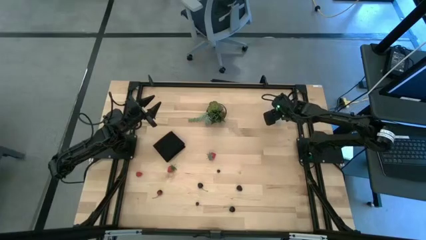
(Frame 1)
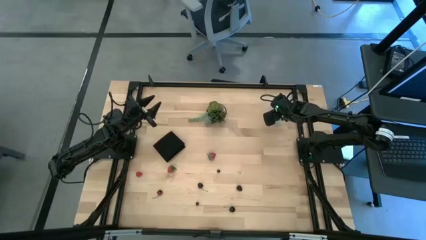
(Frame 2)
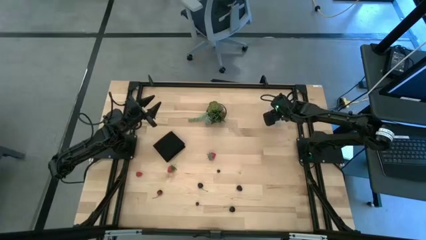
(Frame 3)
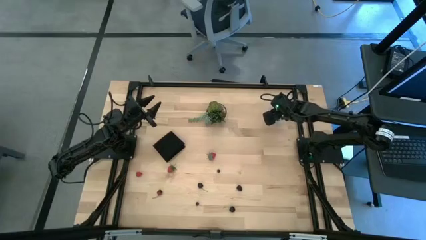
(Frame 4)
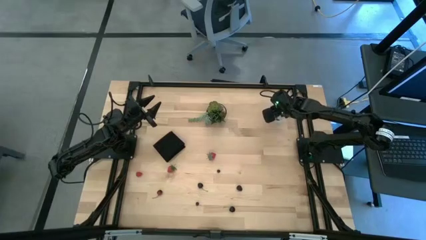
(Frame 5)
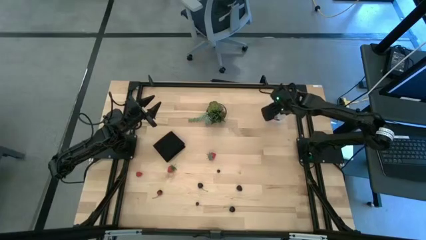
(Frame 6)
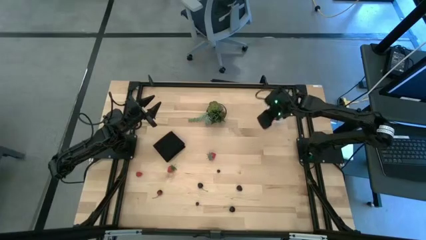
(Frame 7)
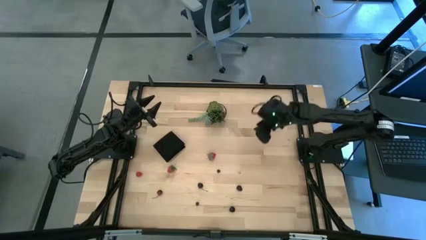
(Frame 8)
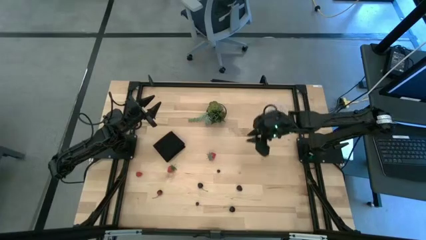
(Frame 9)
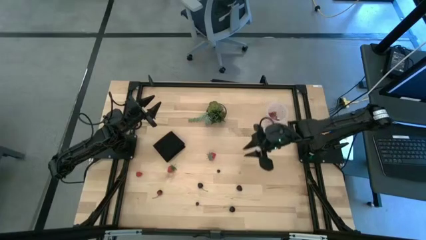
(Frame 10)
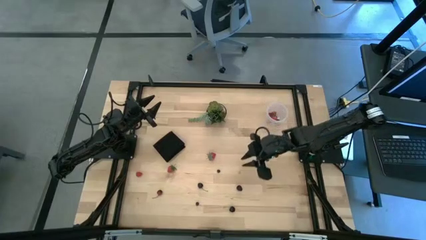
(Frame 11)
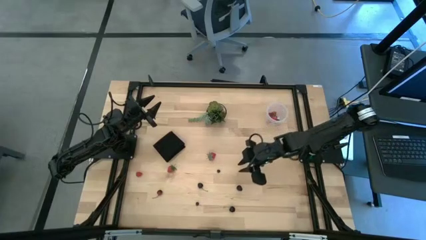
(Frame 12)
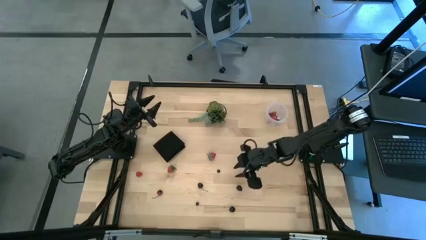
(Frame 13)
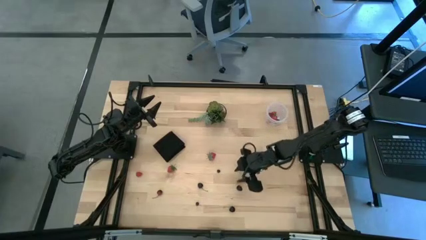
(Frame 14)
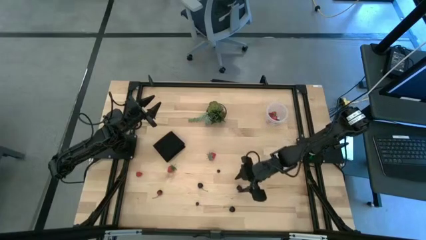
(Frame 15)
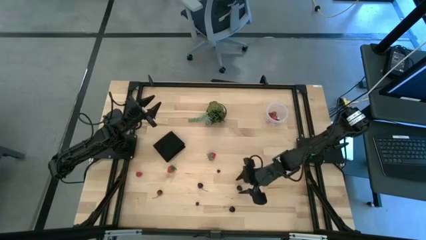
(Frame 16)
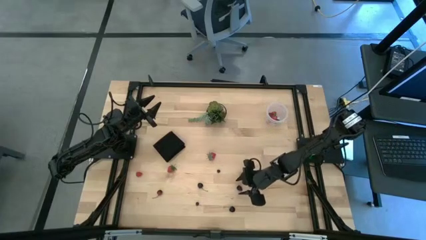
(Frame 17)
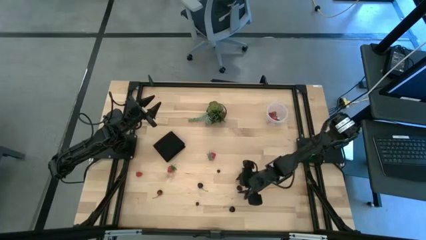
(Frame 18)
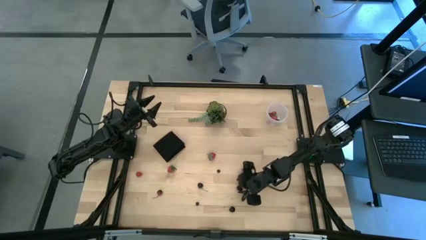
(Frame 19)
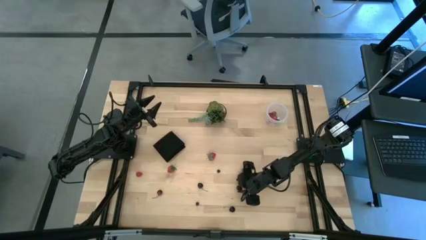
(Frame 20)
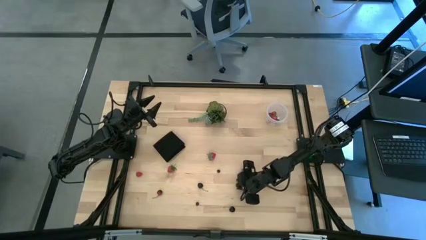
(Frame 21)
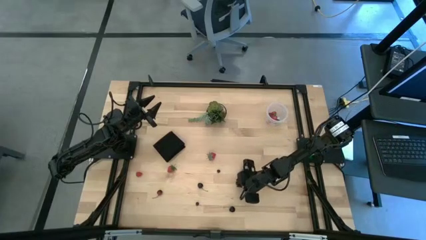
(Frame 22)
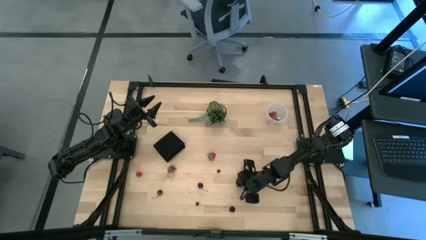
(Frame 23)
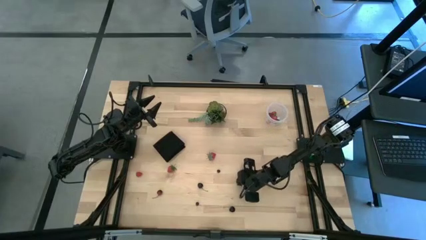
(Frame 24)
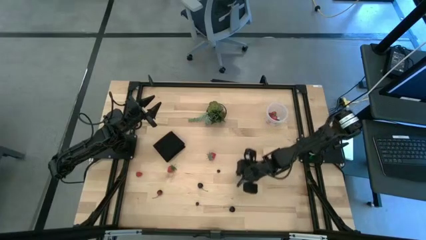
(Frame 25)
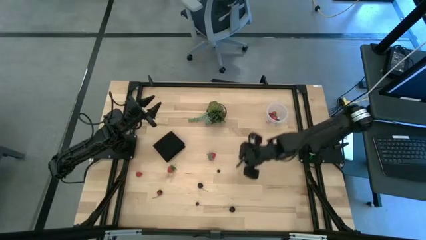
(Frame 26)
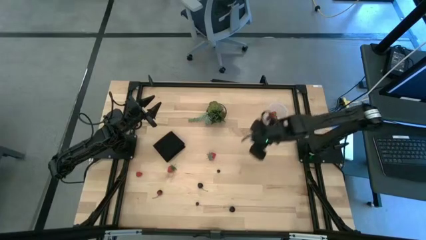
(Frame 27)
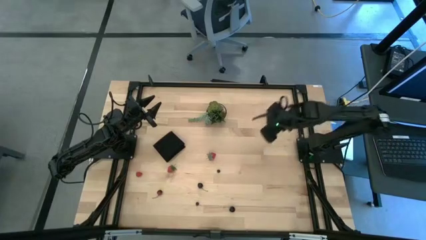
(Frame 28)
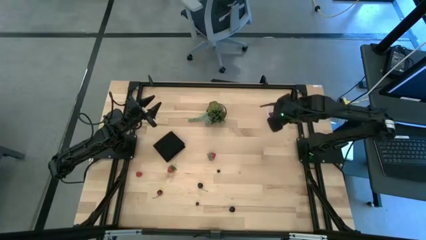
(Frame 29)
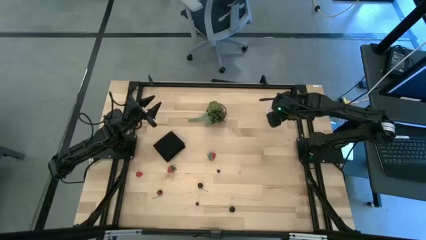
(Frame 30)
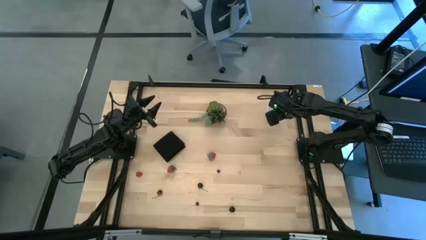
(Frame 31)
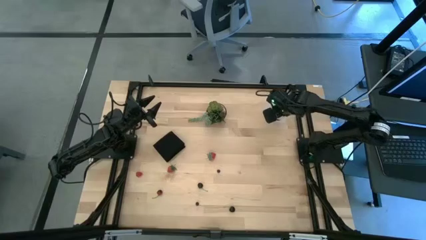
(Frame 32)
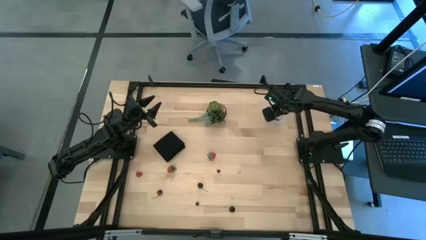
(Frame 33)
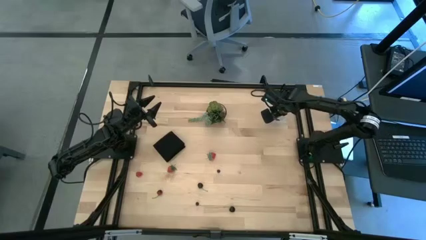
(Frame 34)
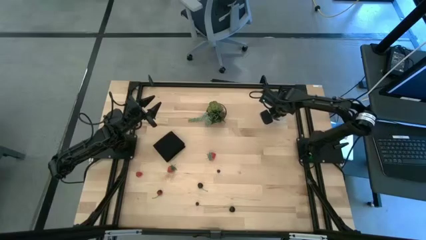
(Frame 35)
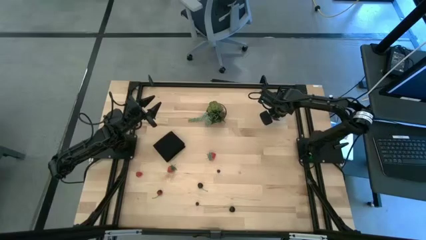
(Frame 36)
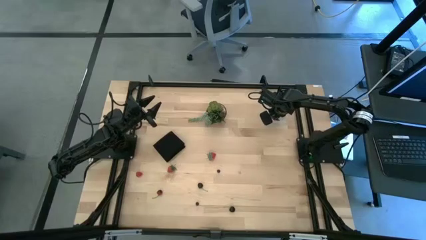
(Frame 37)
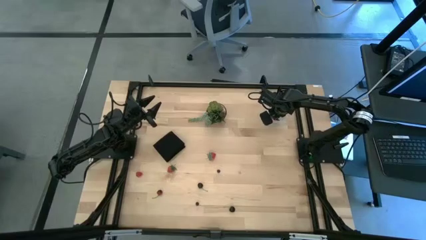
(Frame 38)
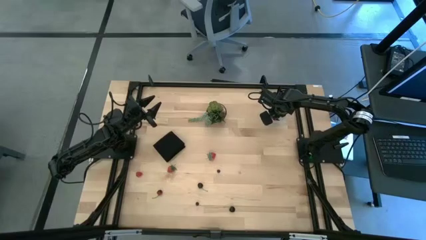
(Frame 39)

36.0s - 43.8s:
Task: Pick and placing Produce into tupperware
Put the top blackberry into the bin

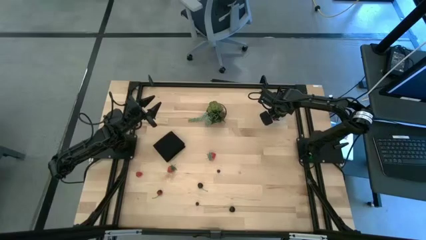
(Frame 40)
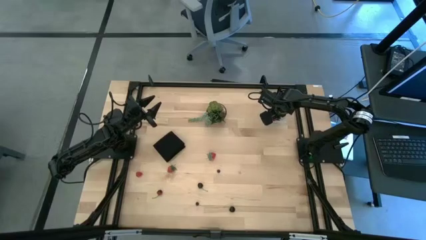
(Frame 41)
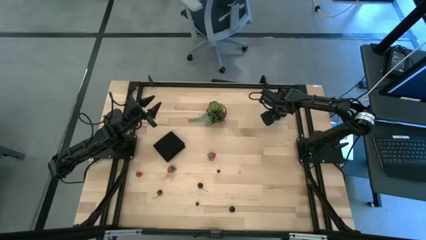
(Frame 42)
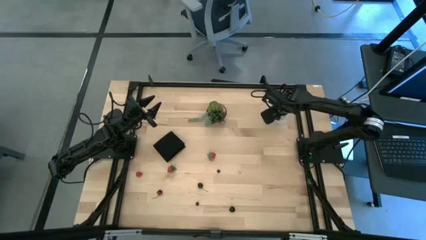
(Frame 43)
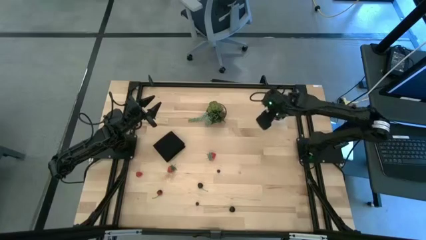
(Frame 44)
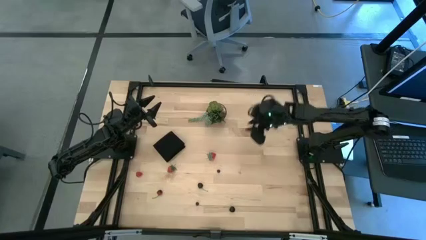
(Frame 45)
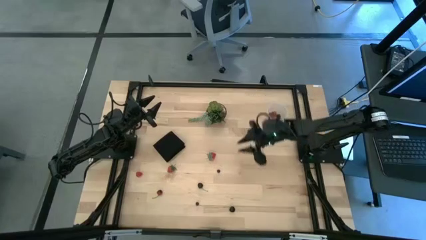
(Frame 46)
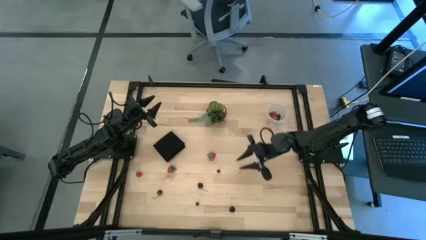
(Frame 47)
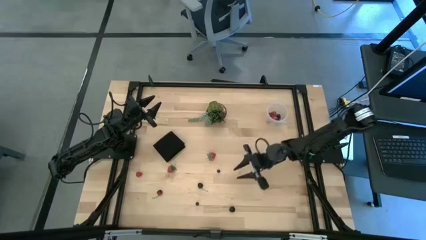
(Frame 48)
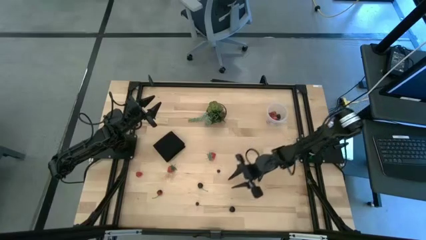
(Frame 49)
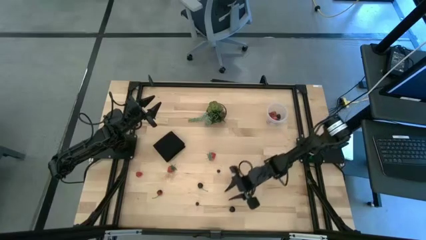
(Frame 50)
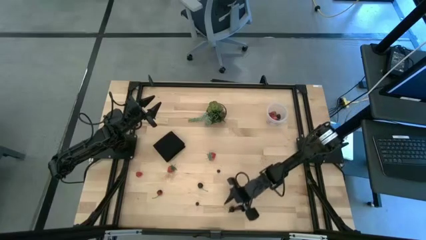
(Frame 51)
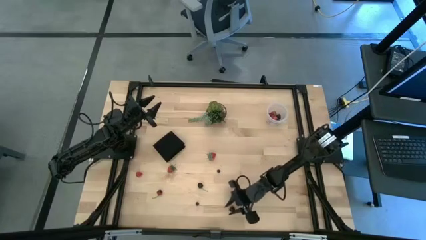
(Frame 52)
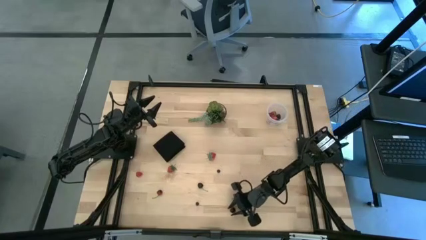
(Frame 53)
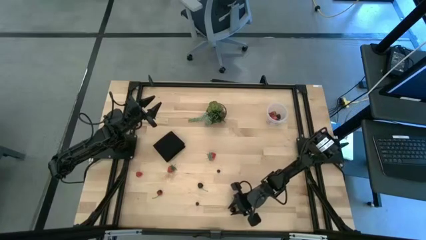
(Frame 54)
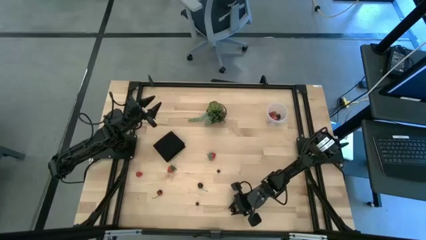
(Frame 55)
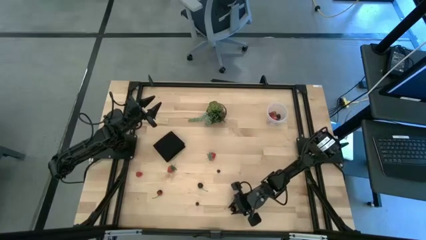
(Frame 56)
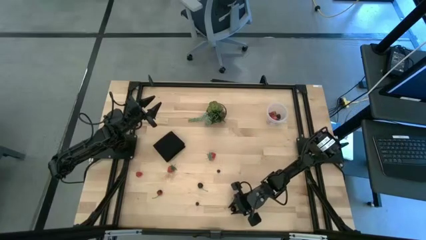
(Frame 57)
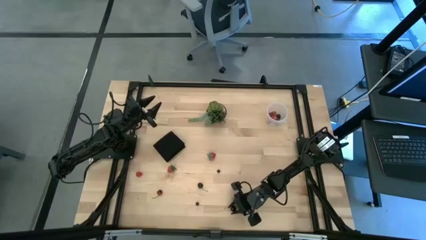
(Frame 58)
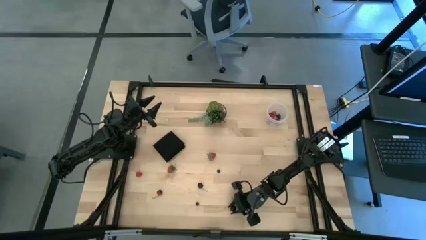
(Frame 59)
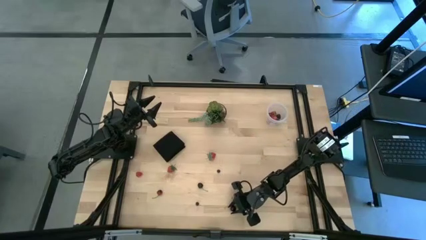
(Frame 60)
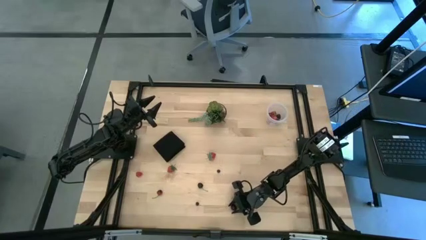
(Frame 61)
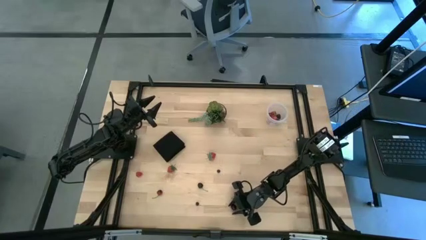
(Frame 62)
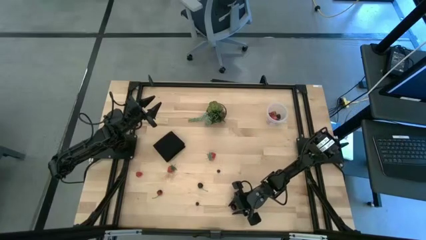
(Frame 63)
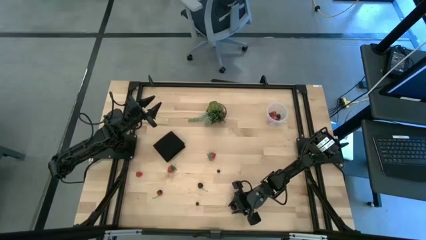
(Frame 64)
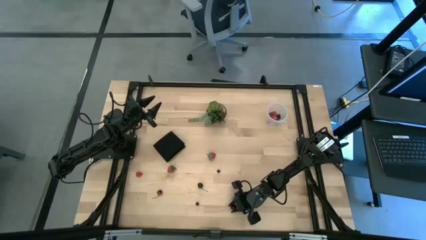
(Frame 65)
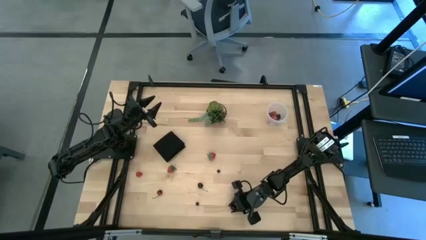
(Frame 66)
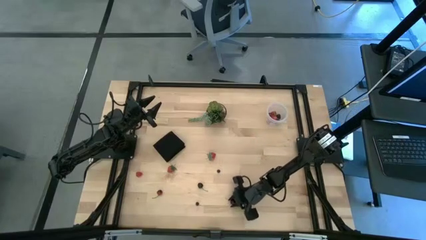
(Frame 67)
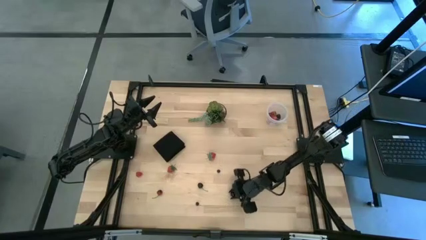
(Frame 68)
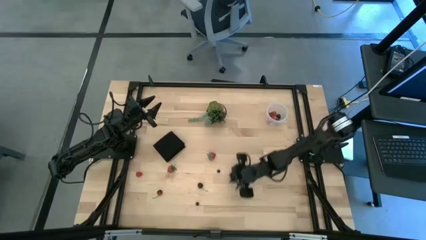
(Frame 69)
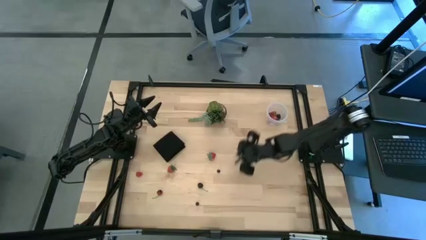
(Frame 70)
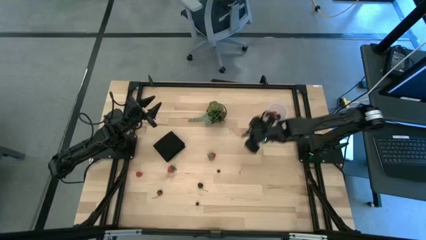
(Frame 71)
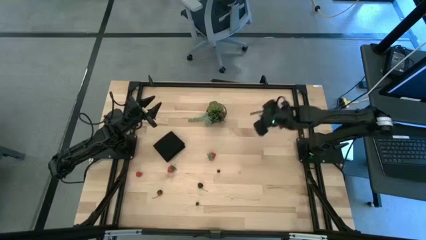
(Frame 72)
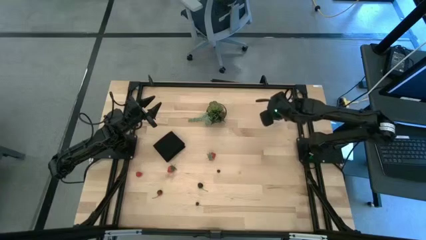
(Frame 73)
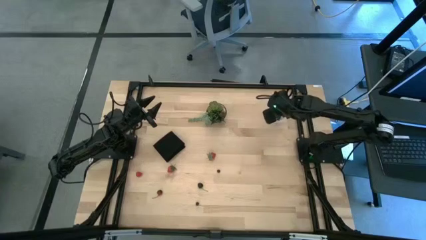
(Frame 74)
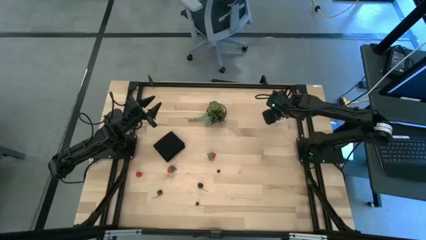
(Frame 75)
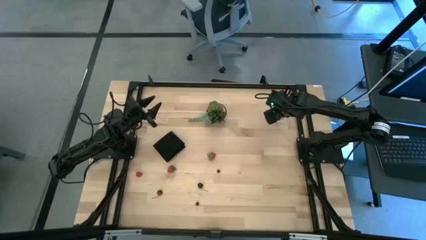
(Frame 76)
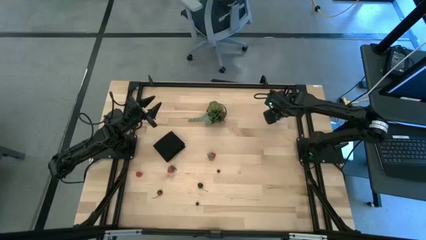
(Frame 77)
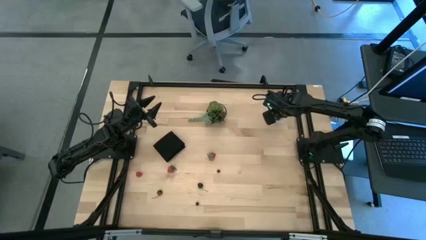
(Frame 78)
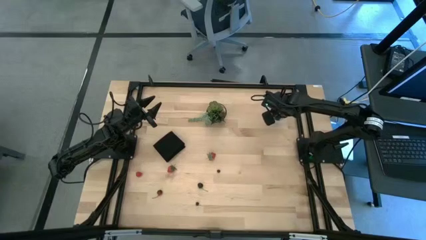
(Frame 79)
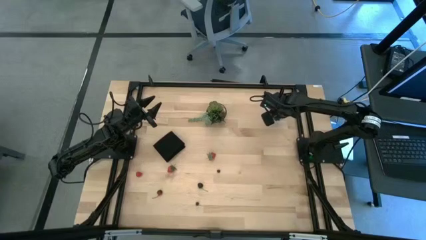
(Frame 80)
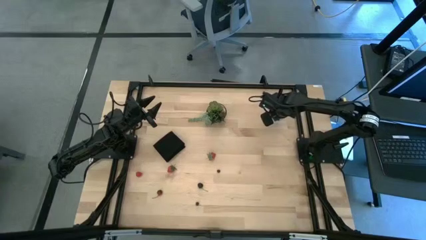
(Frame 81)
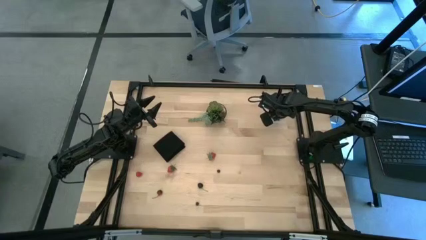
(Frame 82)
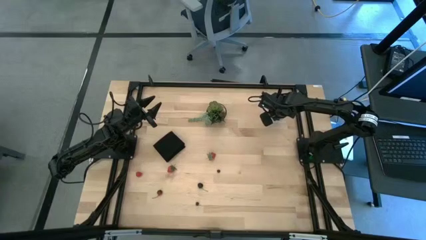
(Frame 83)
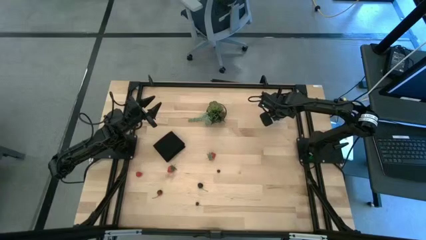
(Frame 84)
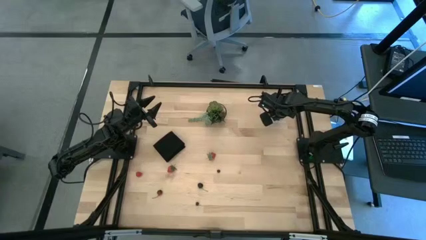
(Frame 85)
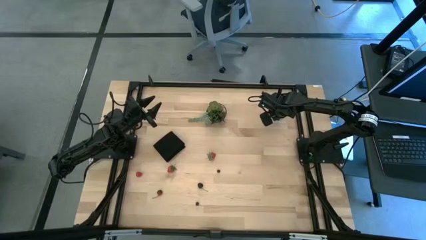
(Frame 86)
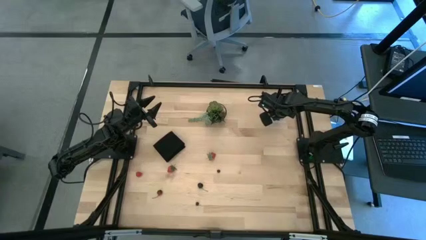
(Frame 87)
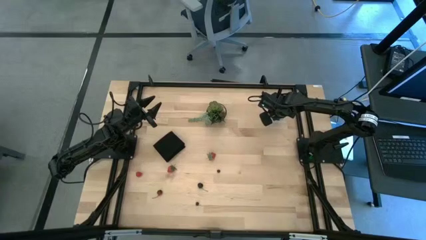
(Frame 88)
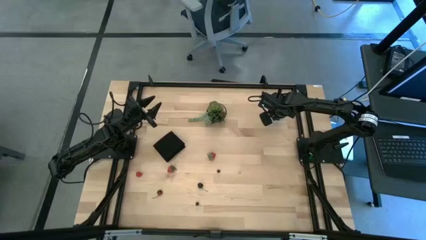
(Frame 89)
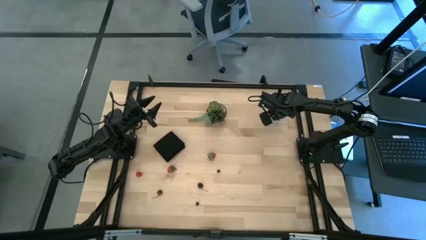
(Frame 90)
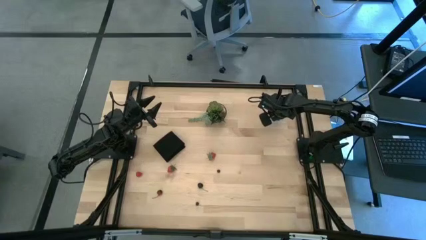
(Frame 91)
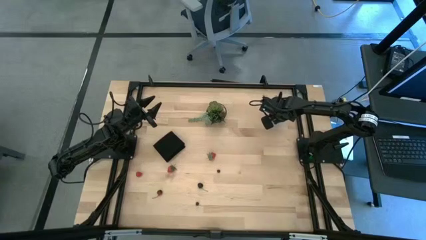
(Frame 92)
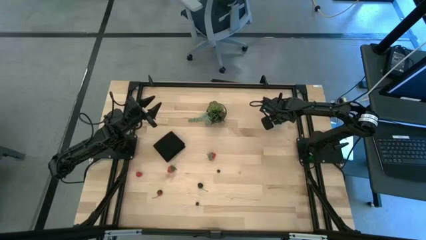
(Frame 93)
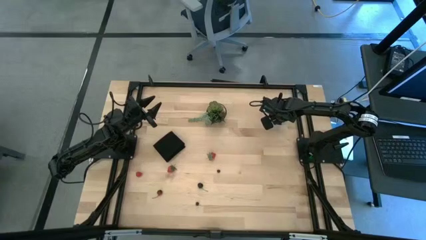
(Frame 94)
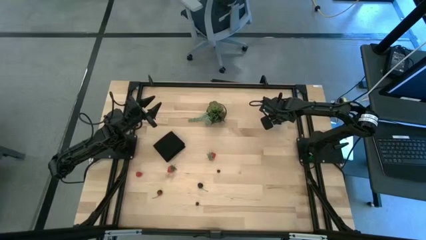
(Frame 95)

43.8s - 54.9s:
Put the bottom black cherry into the bin
